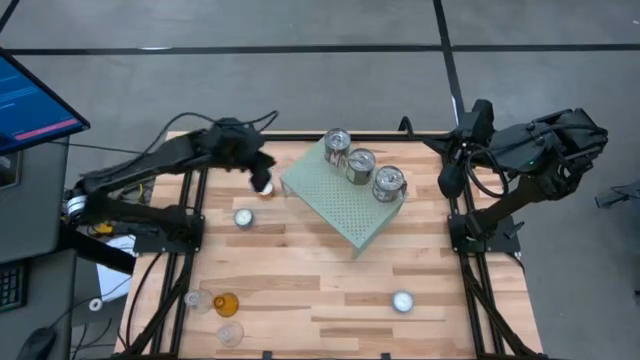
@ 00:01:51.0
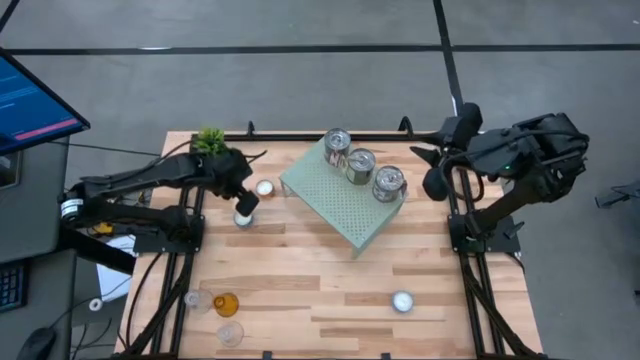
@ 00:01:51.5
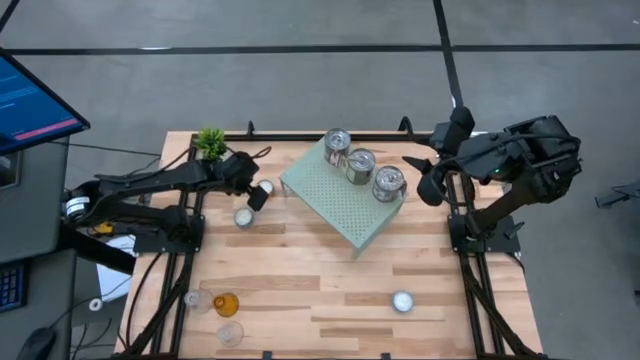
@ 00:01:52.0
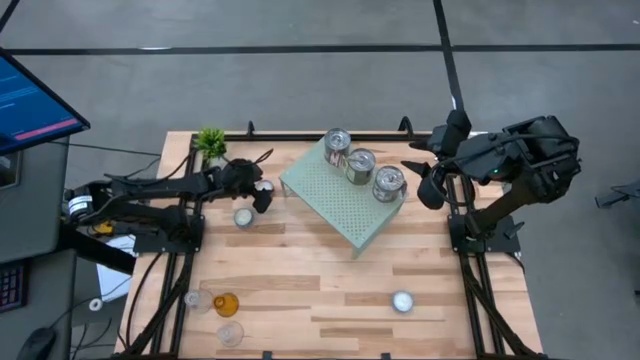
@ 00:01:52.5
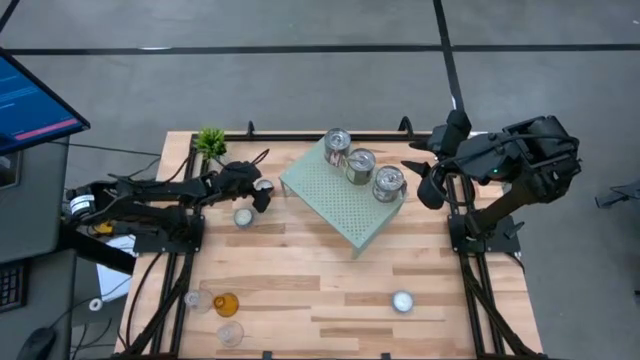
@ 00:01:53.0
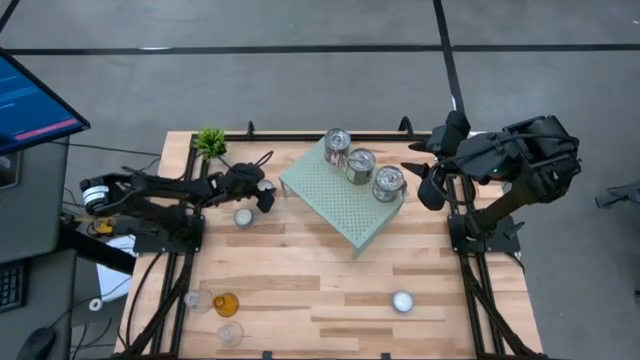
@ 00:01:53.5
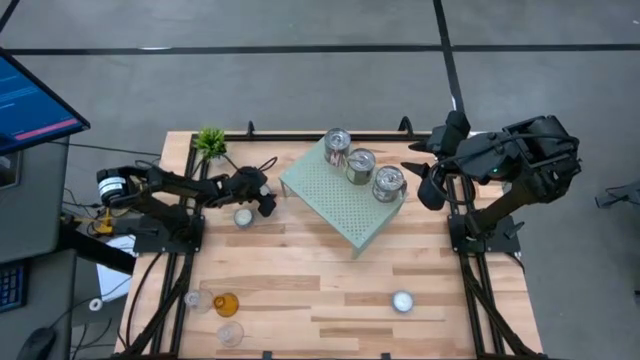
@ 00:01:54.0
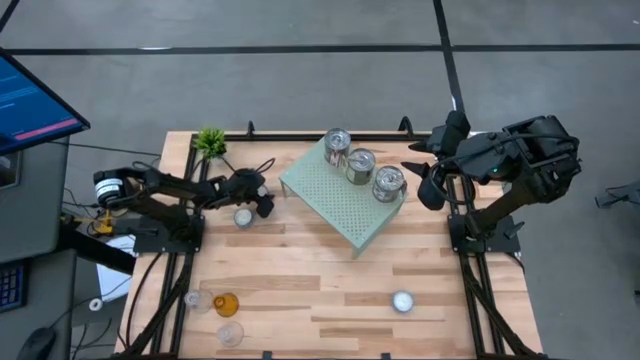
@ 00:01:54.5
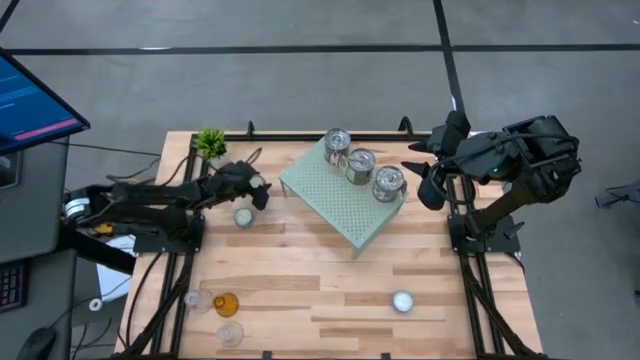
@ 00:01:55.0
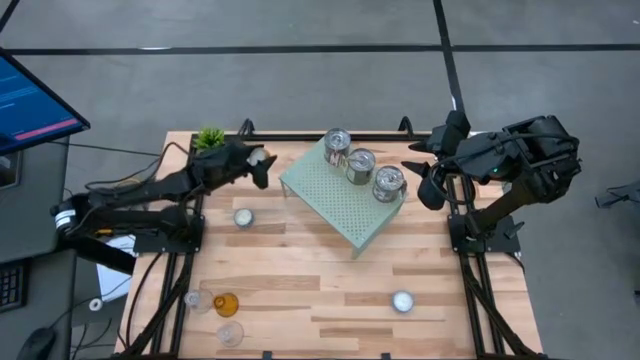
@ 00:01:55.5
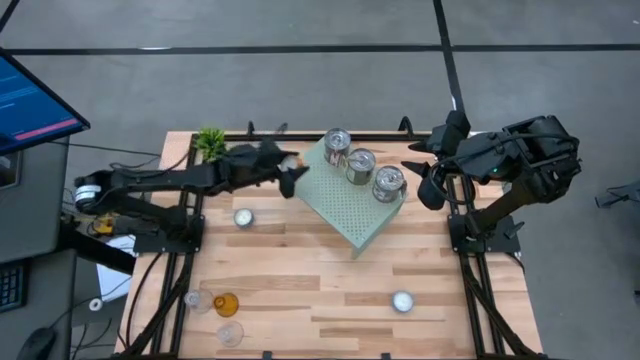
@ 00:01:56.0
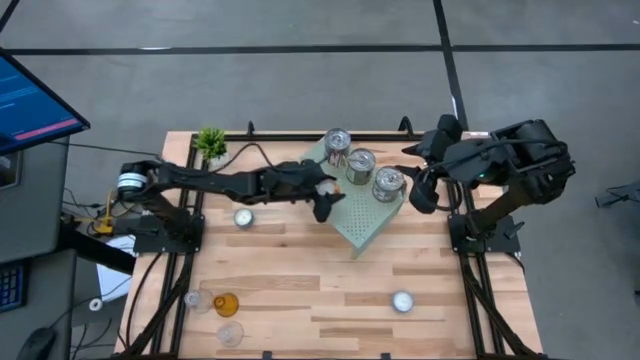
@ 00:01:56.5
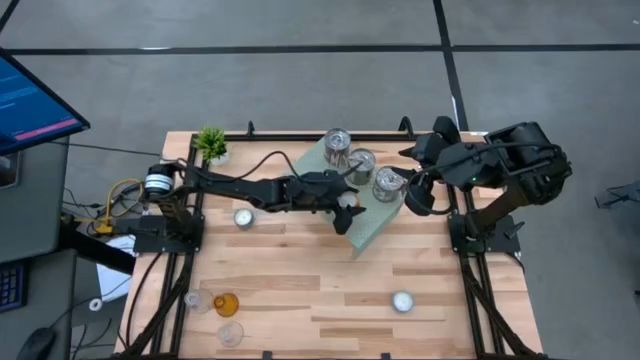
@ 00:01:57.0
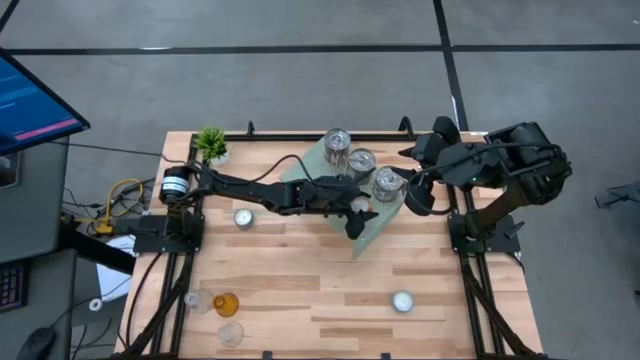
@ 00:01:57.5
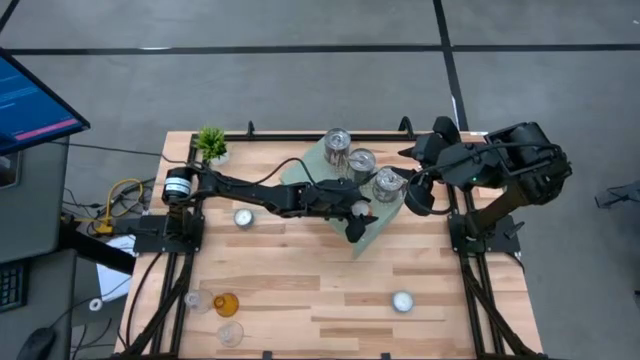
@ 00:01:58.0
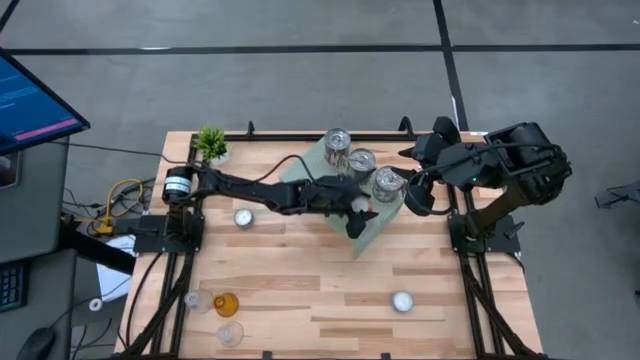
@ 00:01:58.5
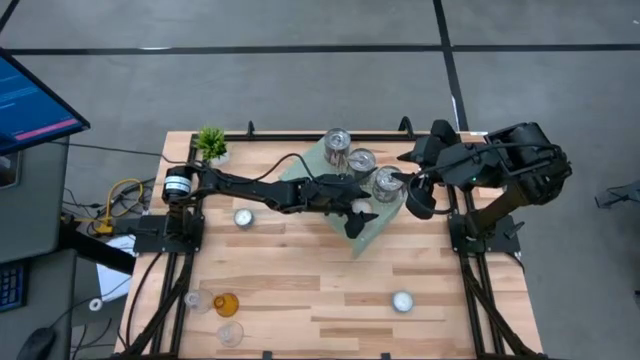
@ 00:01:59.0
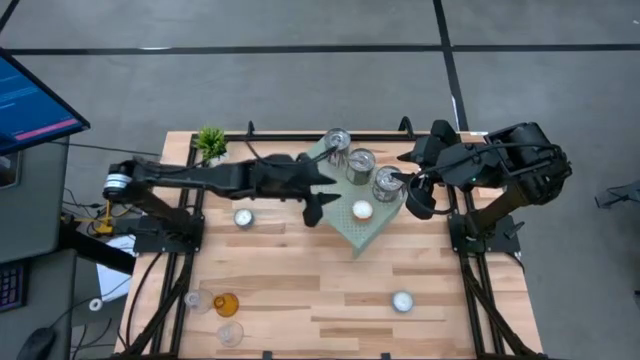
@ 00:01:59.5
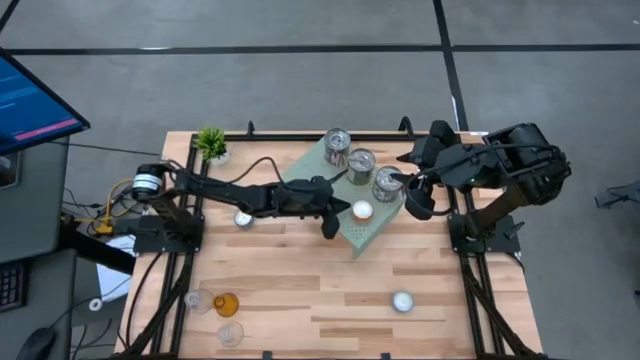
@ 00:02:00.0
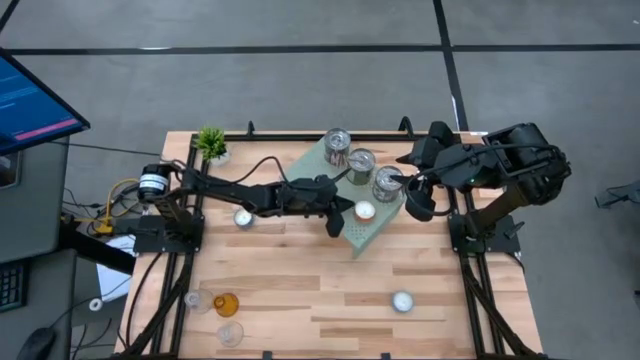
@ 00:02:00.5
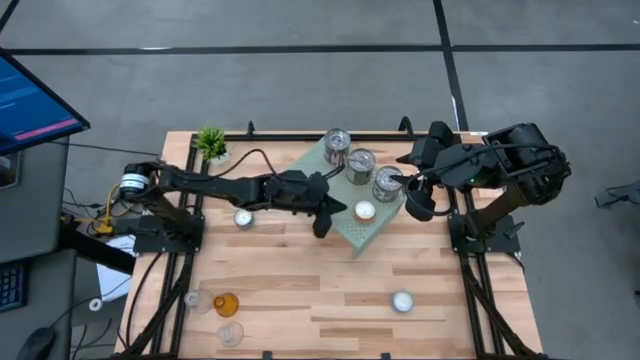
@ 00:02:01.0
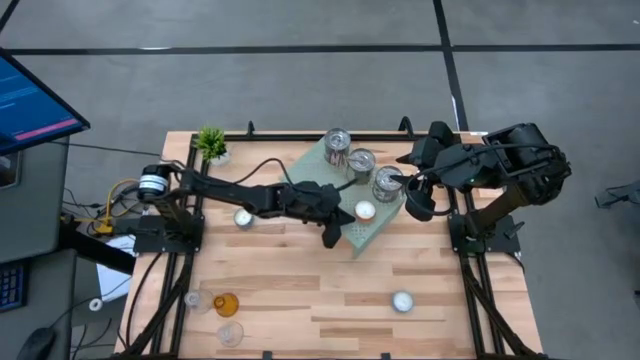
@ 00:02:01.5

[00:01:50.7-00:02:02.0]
Task: Stock candles on shelf
Put the orange scented candle on the shelf

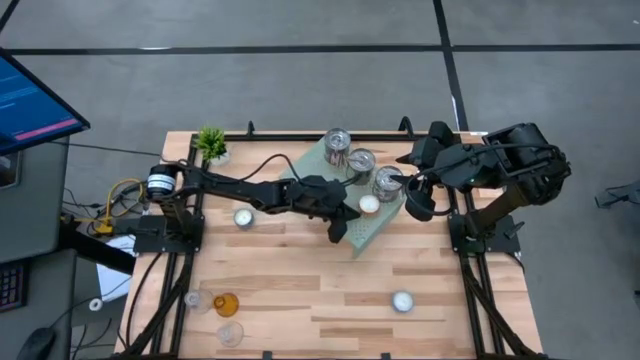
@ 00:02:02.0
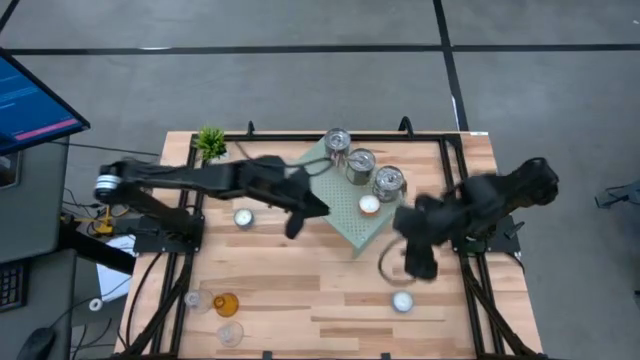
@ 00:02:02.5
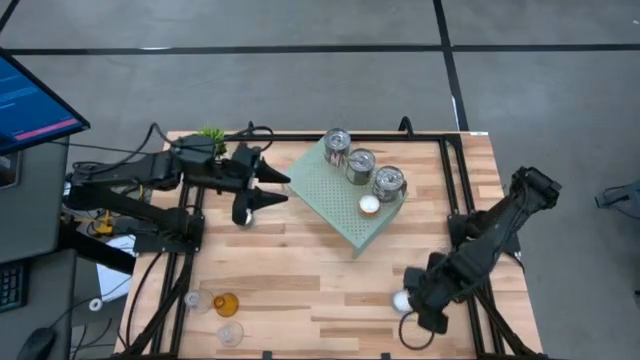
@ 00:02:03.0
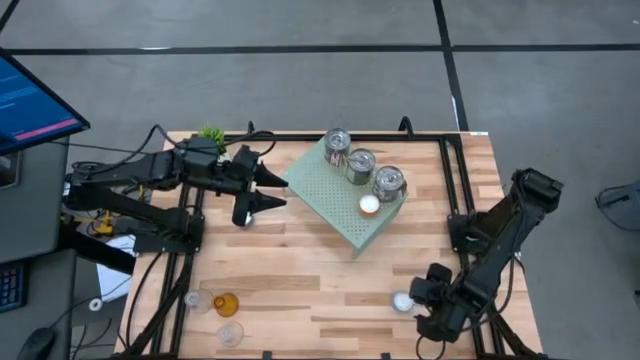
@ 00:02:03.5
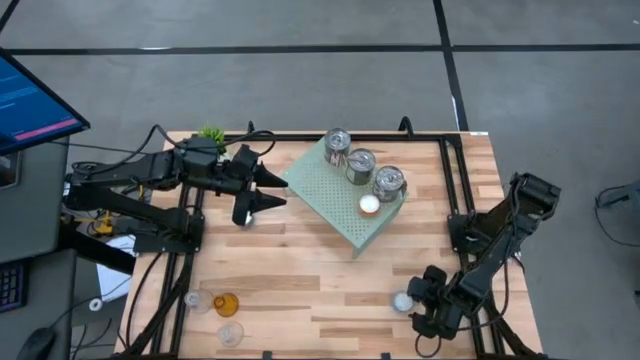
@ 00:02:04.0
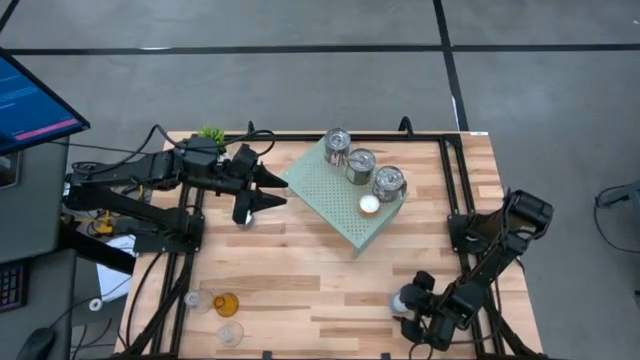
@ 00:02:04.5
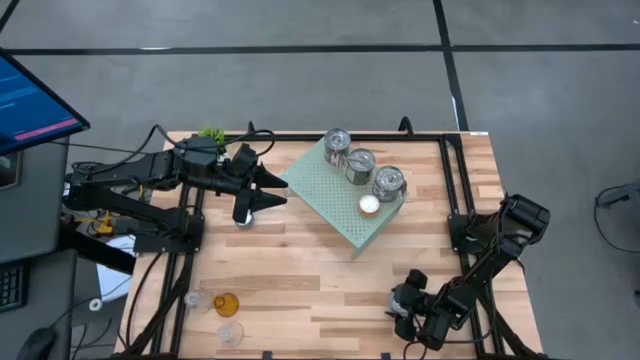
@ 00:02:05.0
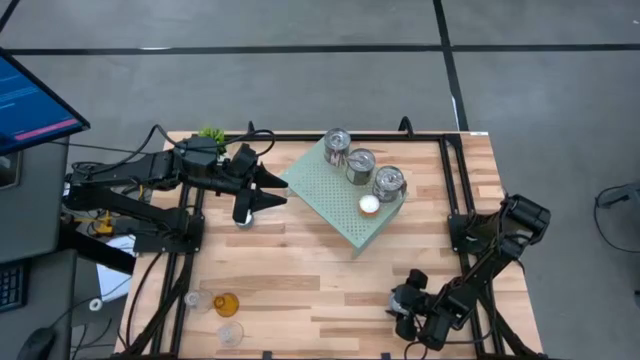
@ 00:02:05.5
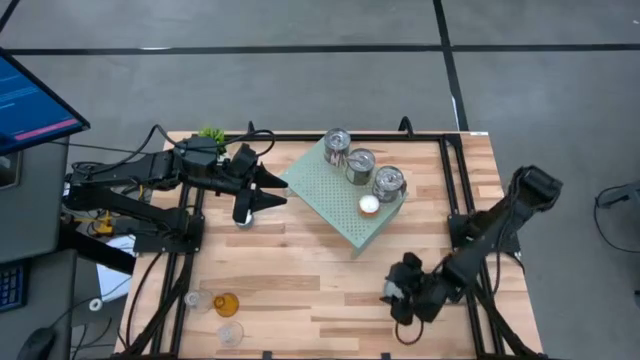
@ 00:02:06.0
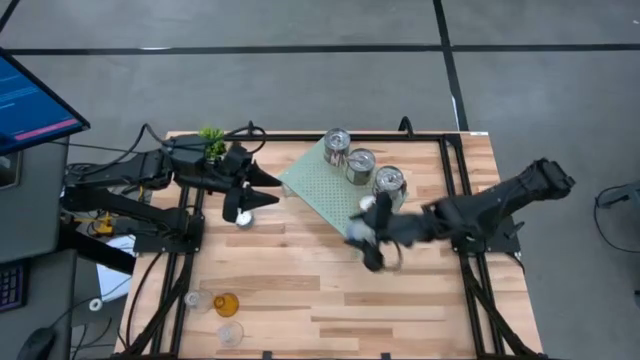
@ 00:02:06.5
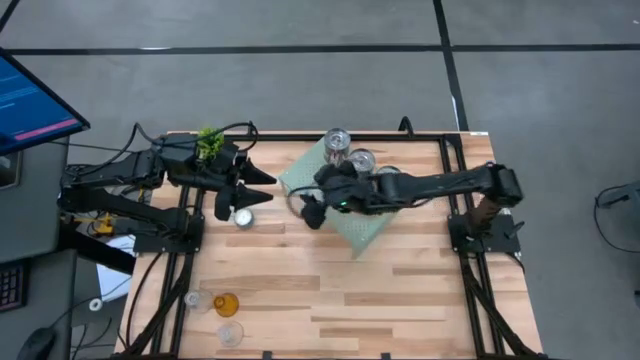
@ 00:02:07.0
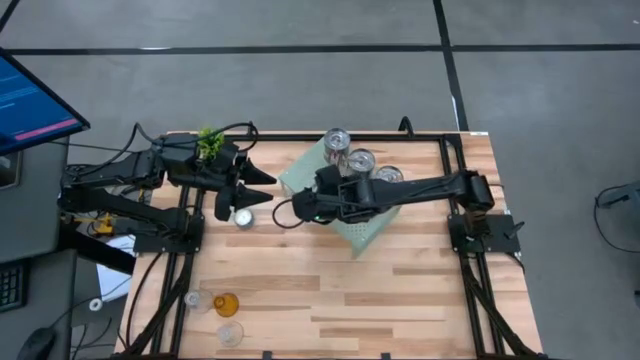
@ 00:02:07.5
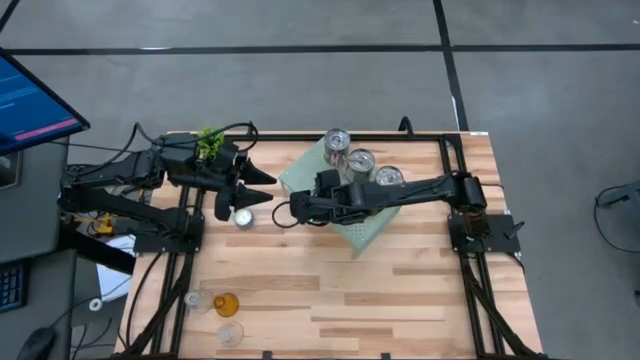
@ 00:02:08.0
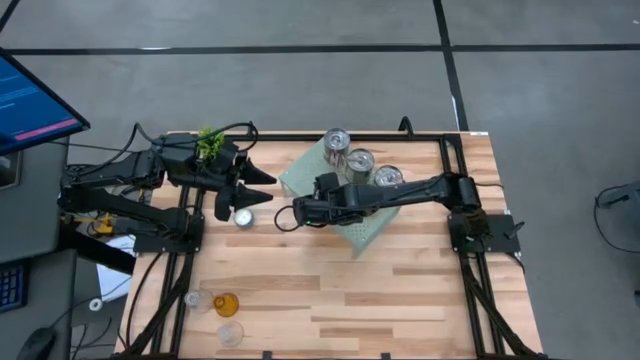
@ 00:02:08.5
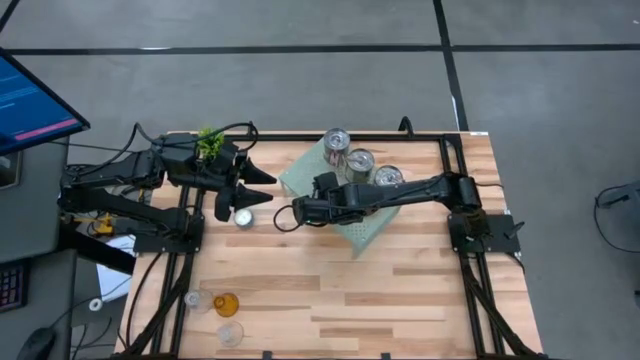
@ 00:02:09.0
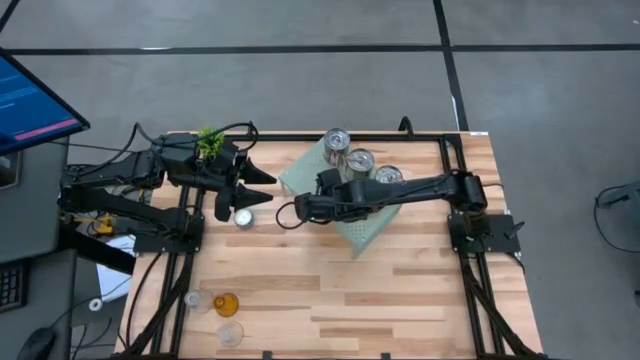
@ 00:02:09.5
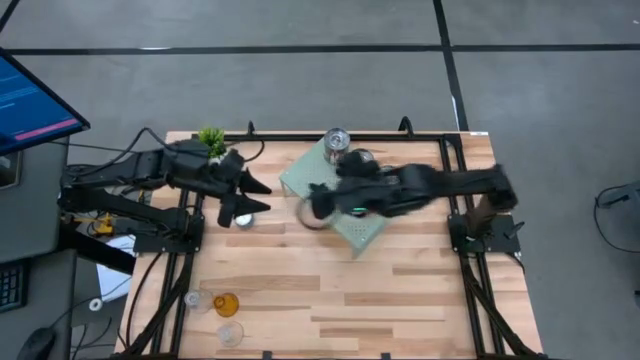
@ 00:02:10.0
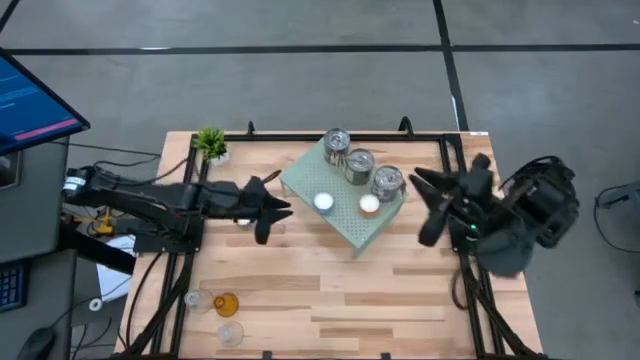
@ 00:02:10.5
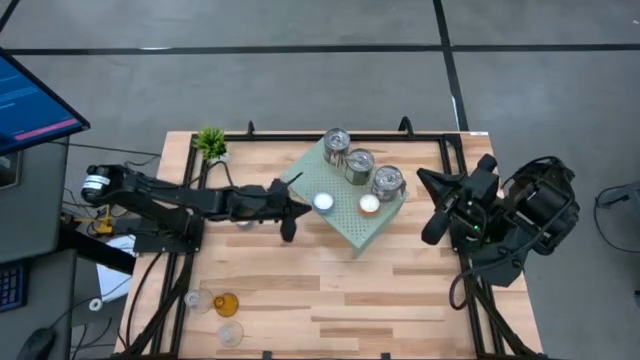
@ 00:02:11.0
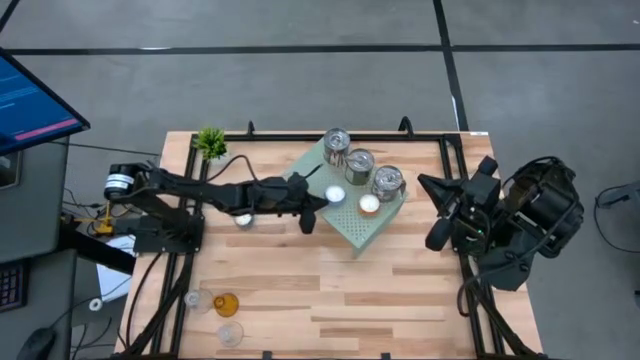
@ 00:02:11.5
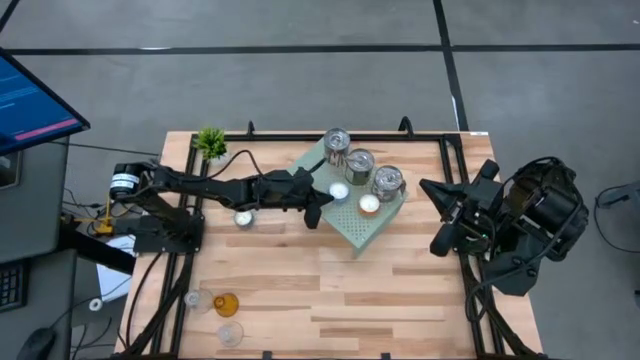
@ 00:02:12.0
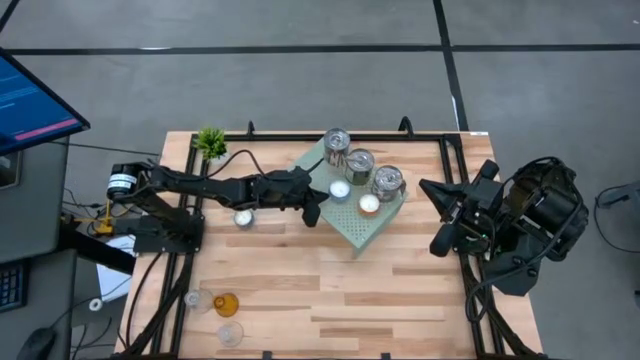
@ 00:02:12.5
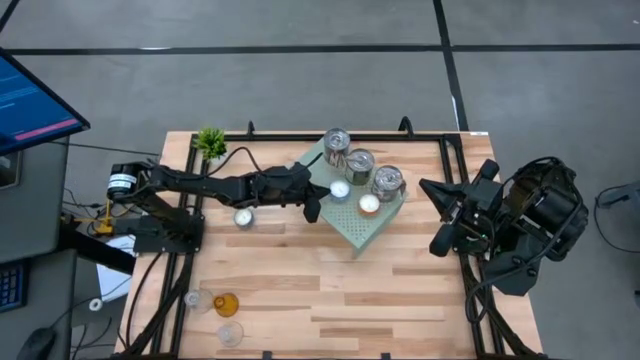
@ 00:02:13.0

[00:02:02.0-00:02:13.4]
Put the bottom blue scented candle on the shelf
